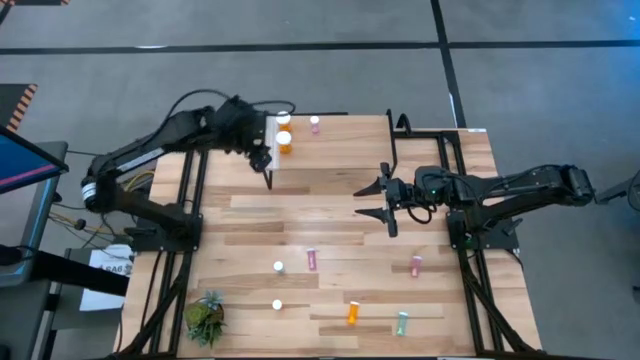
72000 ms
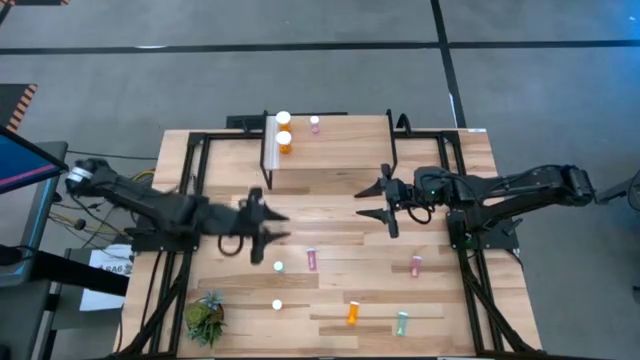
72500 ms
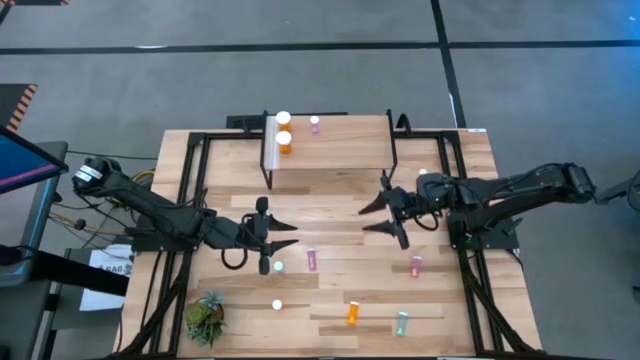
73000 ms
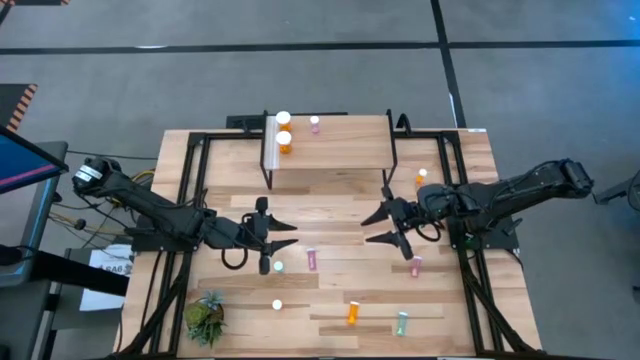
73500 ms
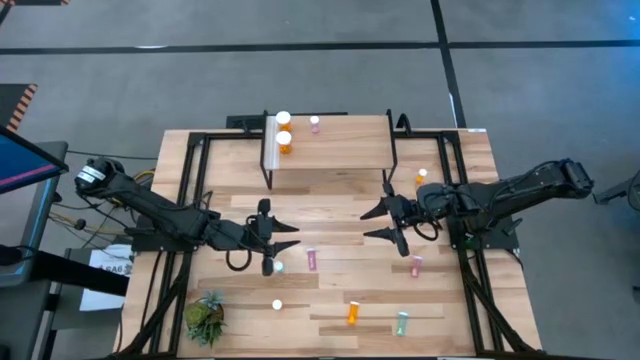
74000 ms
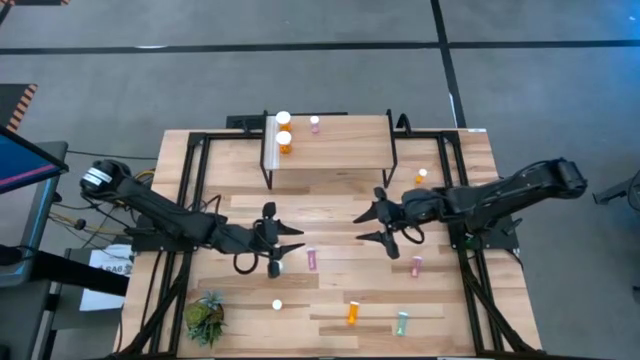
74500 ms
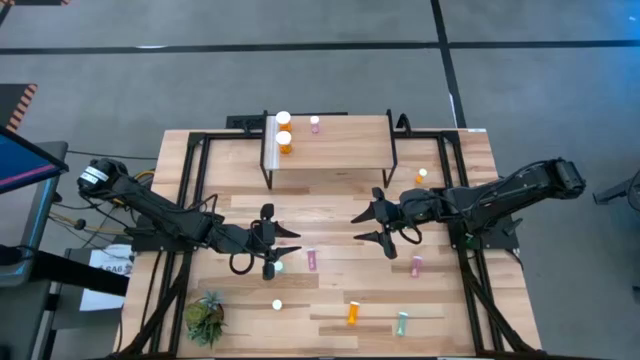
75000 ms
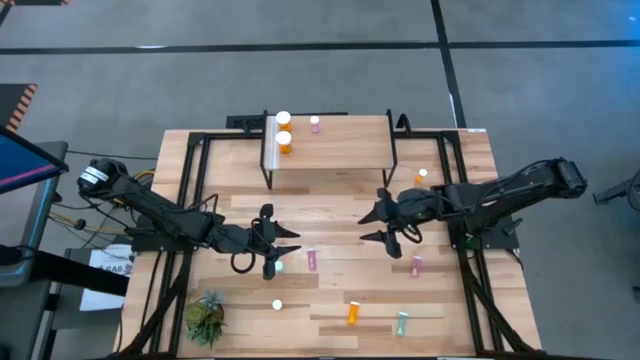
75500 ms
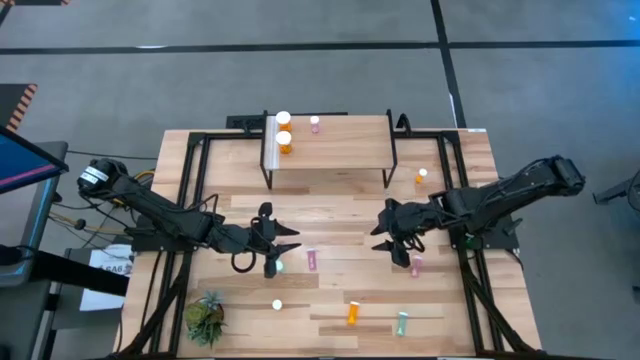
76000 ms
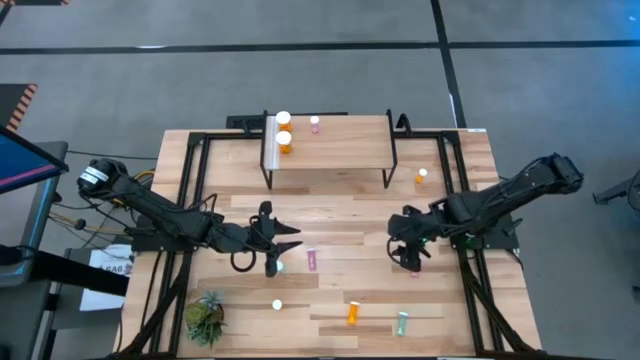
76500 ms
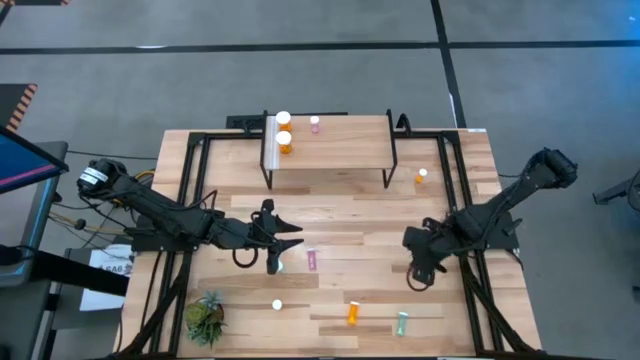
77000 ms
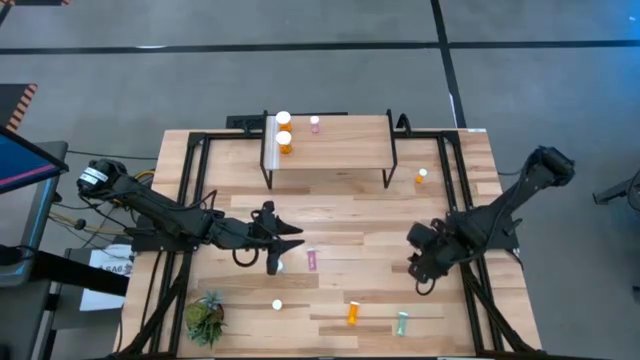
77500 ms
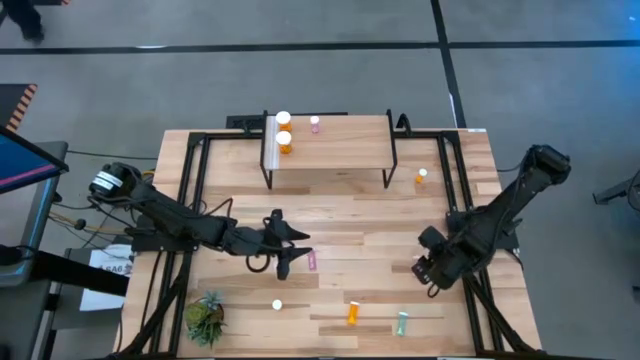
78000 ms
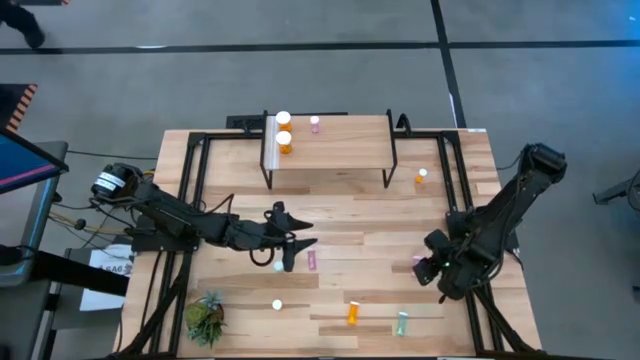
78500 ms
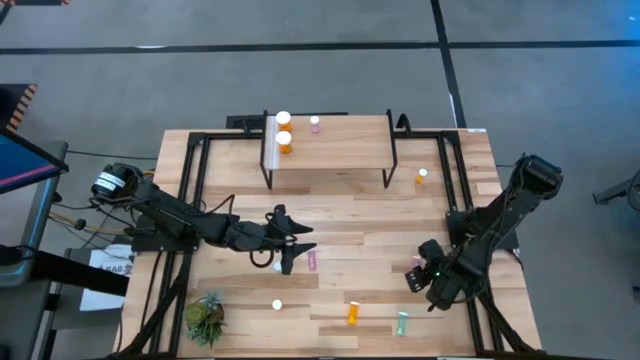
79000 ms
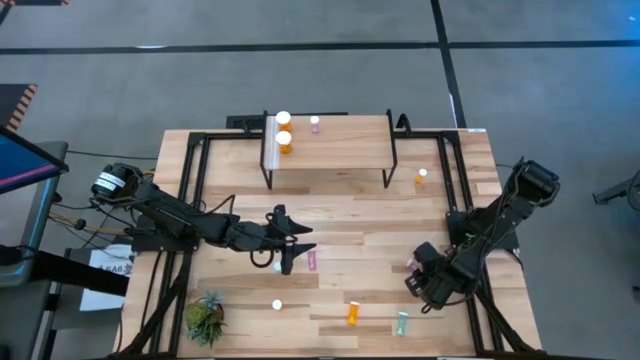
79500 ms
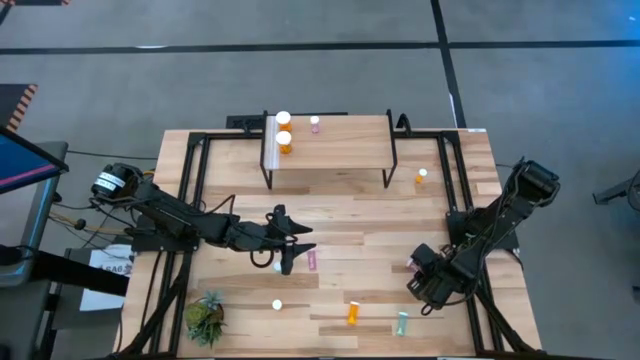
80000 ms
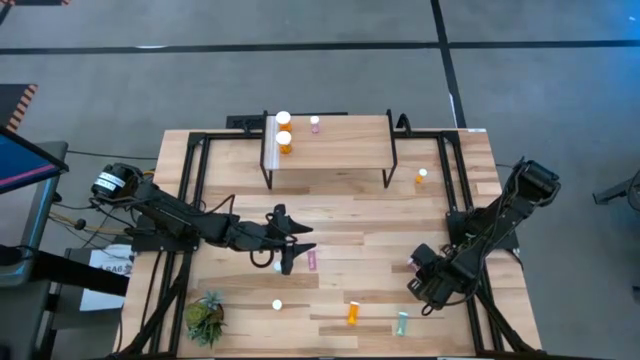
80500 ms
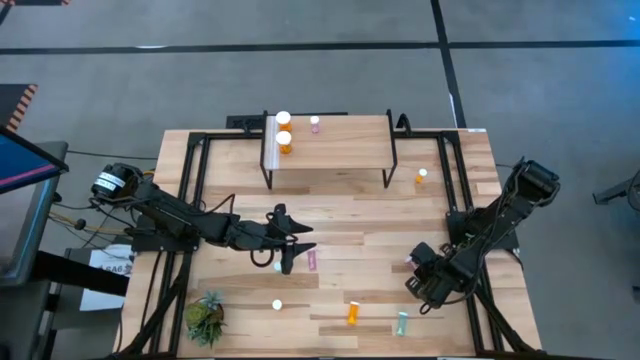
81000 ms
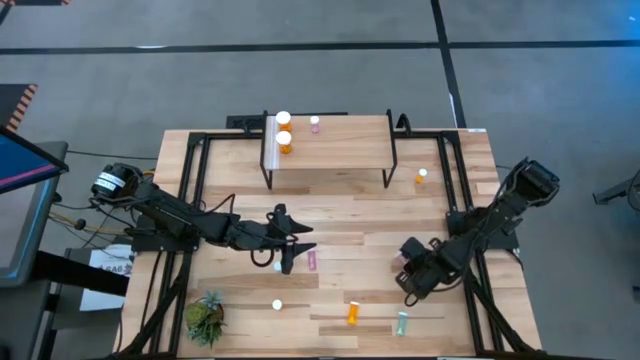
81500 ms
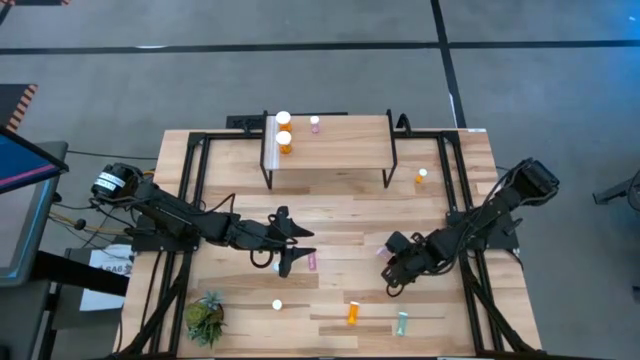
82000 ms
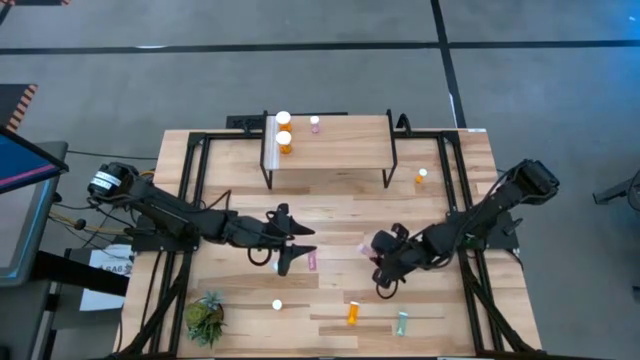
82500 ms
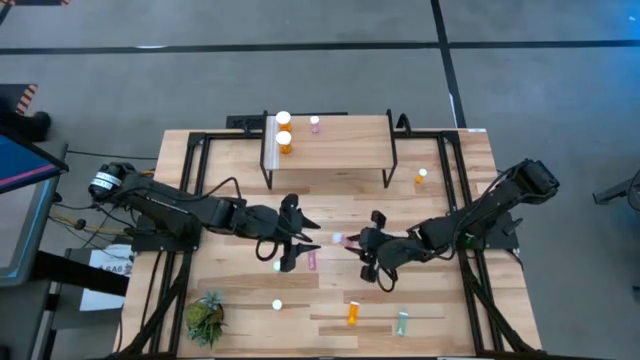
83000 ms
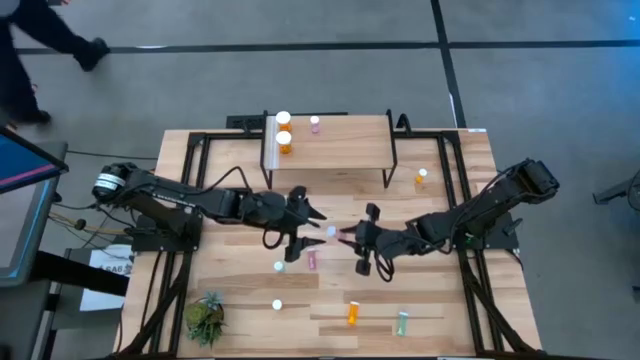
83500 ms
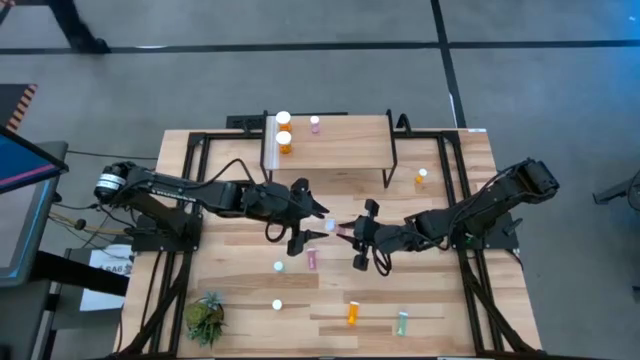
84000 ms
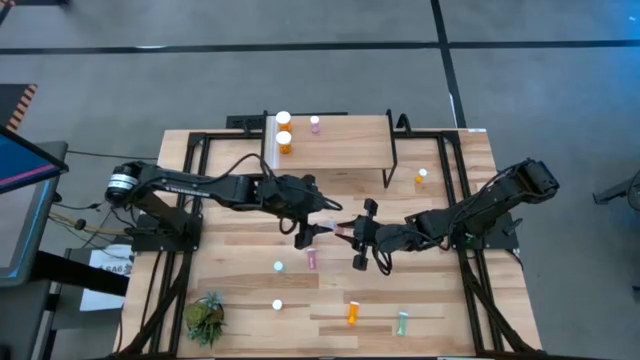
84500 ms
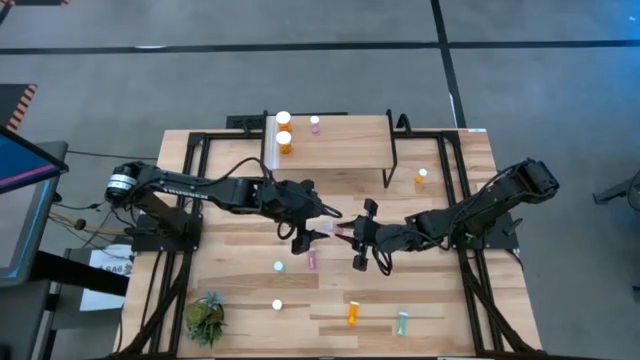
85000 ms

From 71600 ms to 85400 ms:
Task: Pick and place medicine bottles onto shelf by color
Put the right pink pill bottle on the shelf aligned with the other pink pill bottle

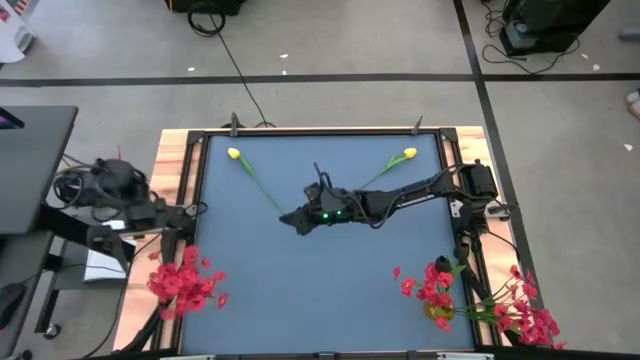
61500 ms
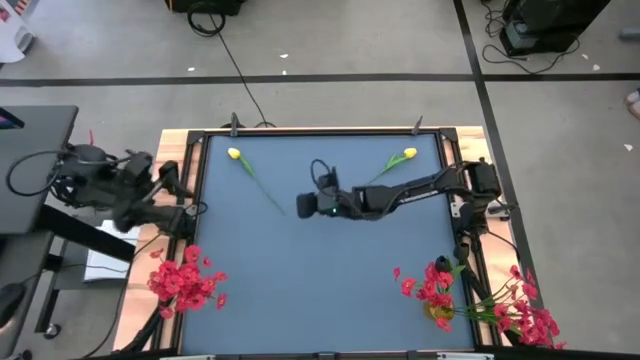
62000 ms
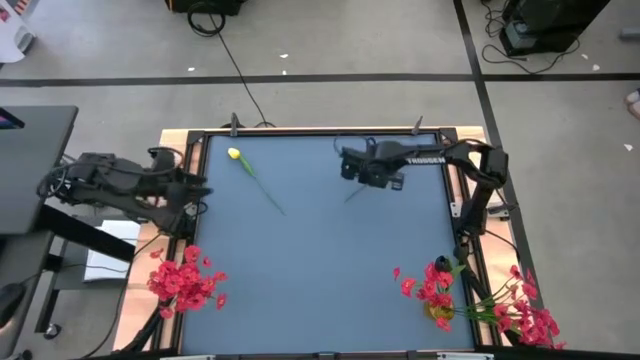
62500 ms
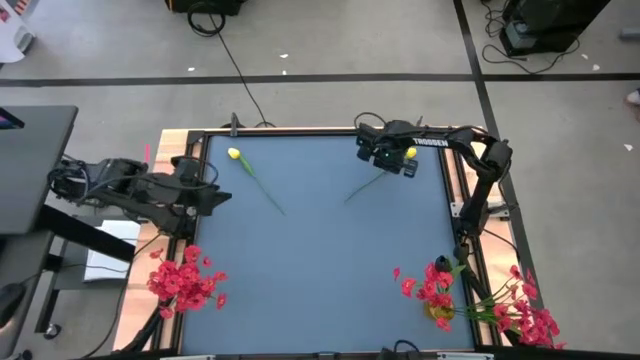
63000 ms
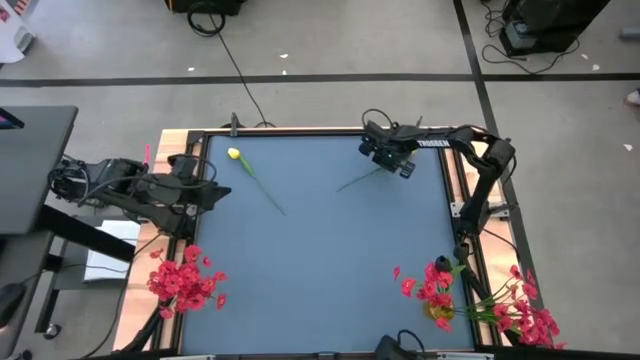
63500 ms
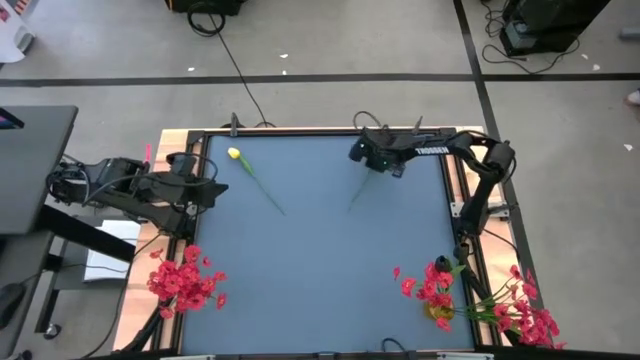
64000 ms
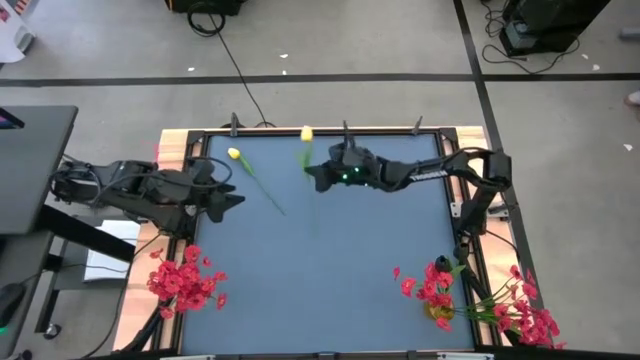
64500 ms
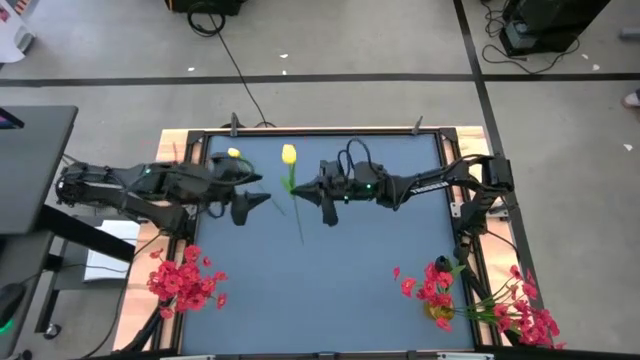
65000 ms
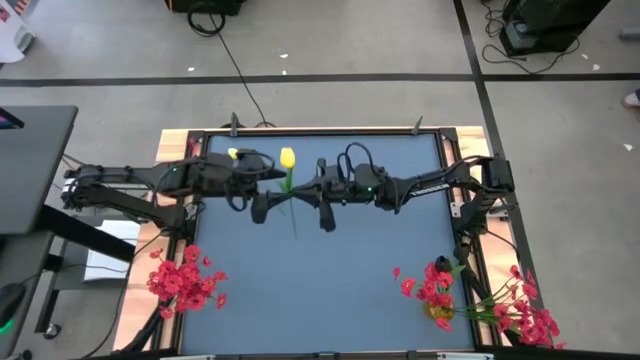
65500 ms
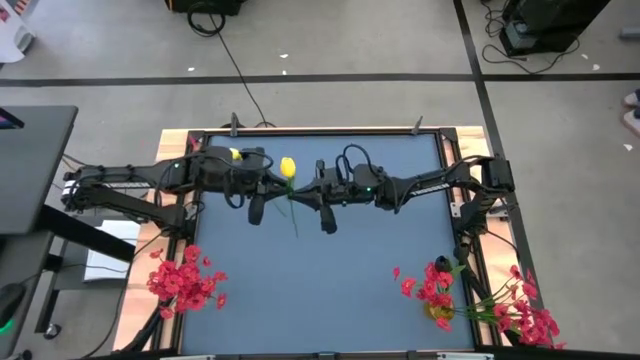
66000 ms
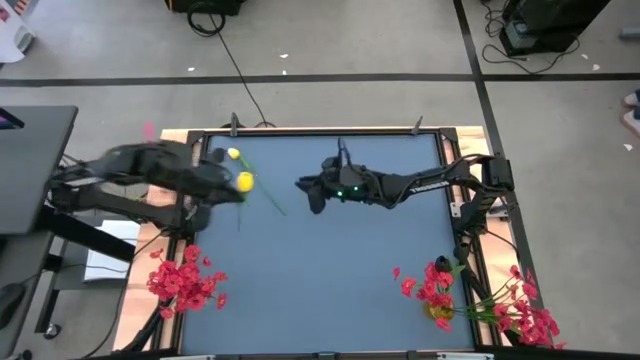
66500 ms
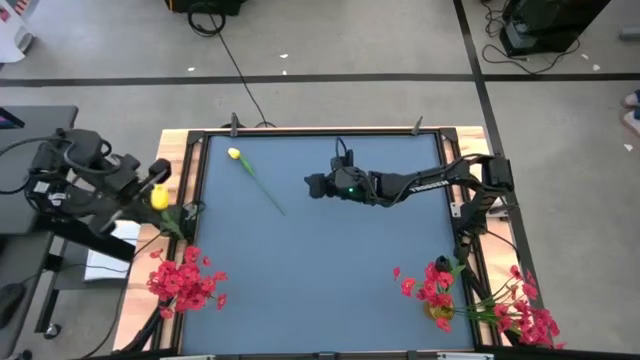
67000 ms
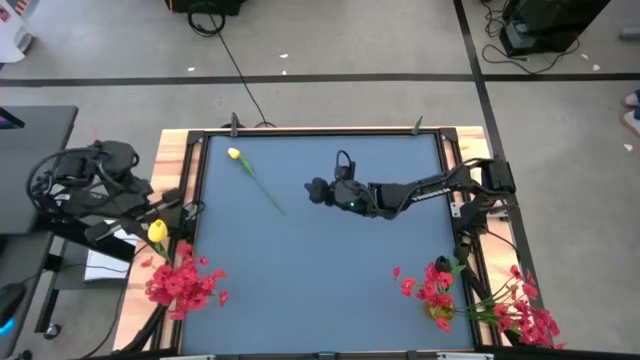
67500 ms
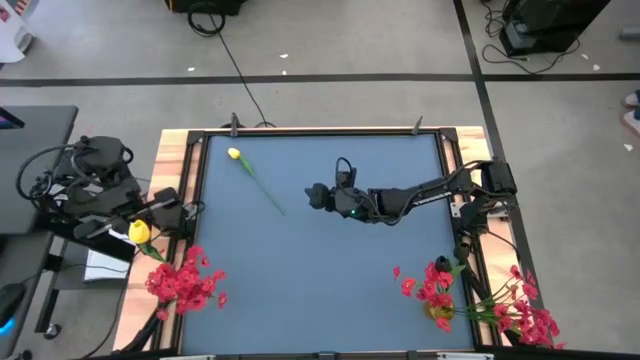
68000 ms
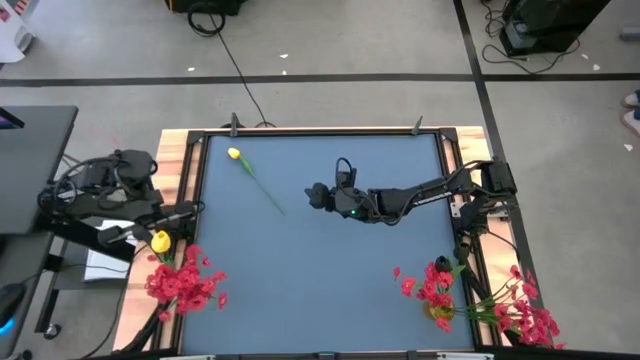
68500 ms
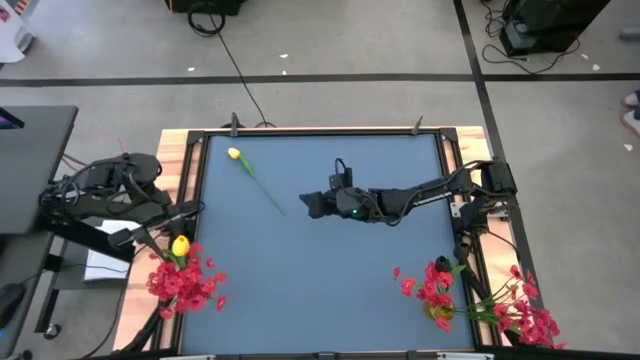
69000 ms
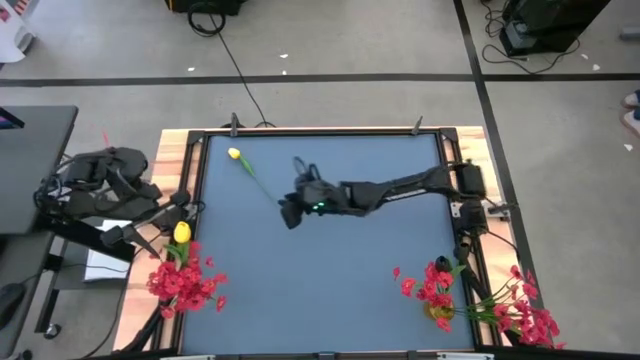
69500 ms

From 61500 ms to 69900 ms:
Task: Sort flowers into vase by color
Put the right yellow flower into the transparent vase
